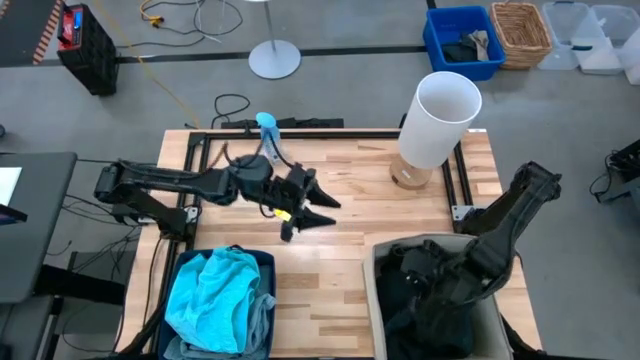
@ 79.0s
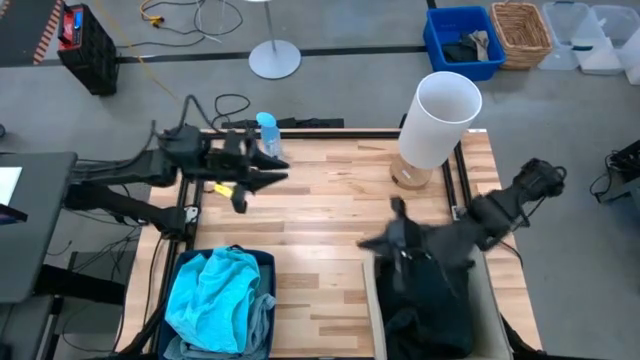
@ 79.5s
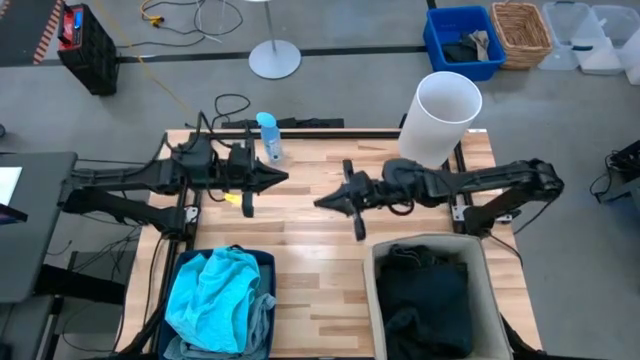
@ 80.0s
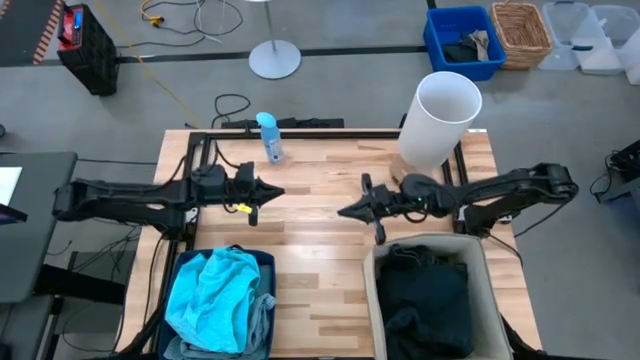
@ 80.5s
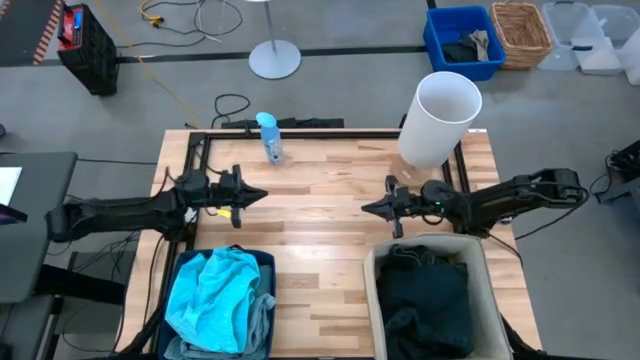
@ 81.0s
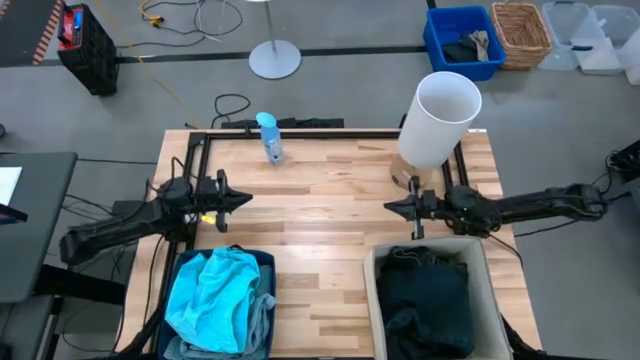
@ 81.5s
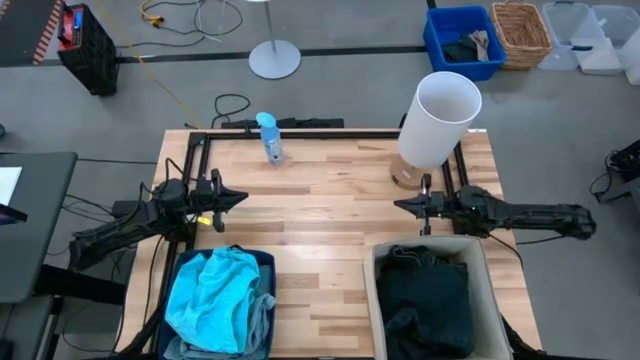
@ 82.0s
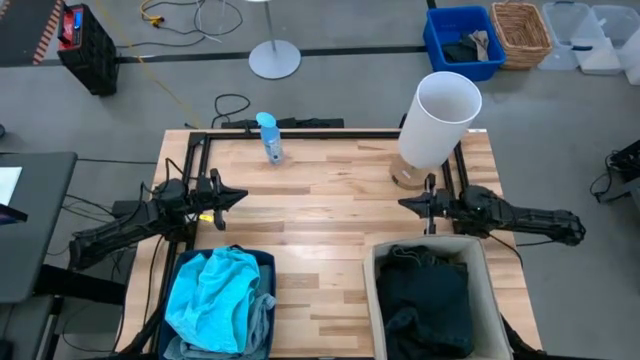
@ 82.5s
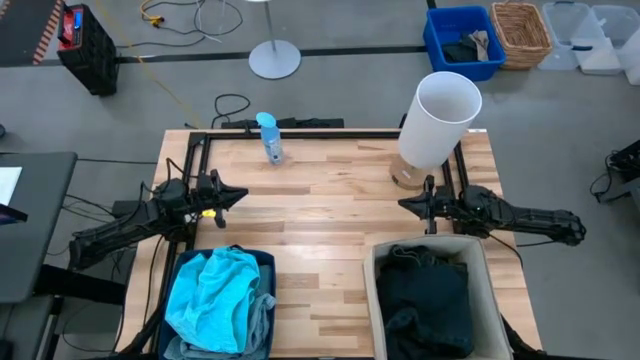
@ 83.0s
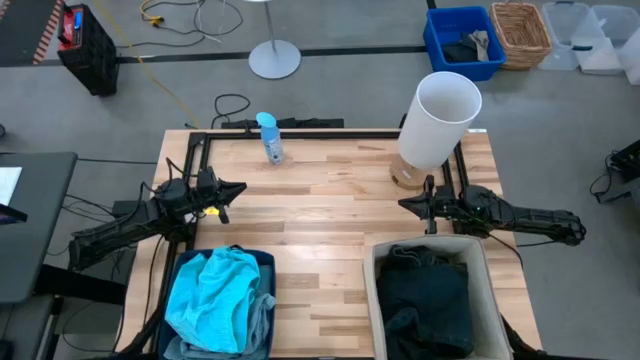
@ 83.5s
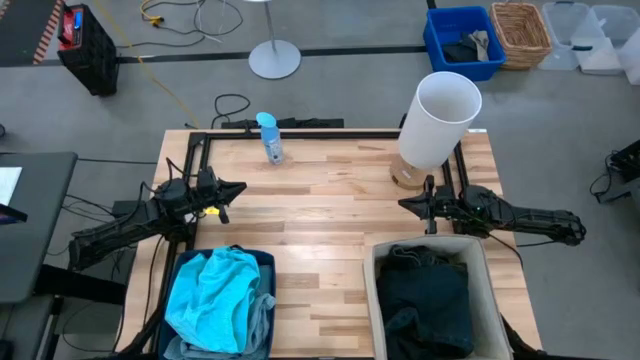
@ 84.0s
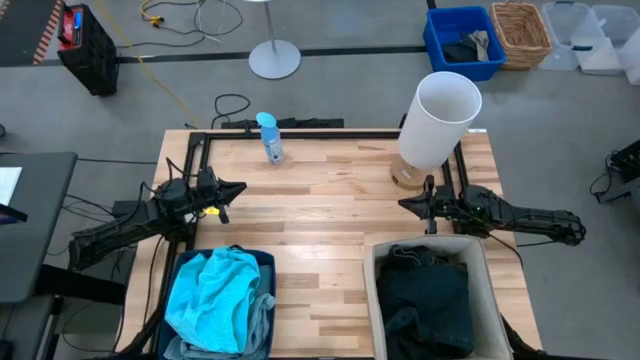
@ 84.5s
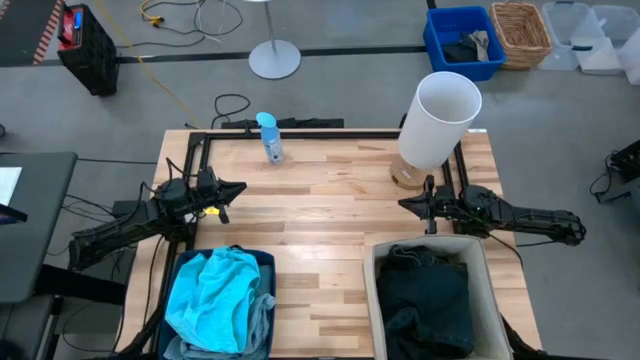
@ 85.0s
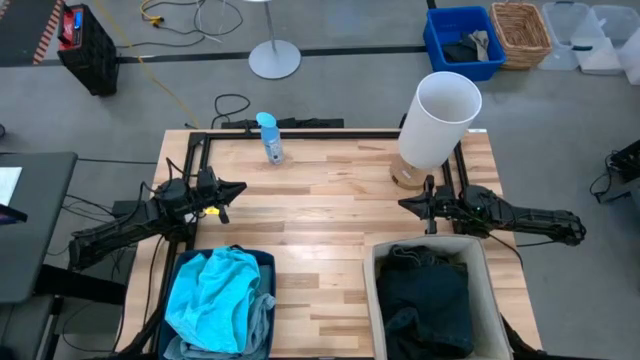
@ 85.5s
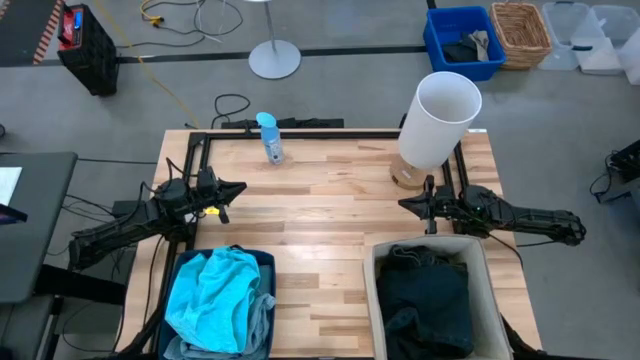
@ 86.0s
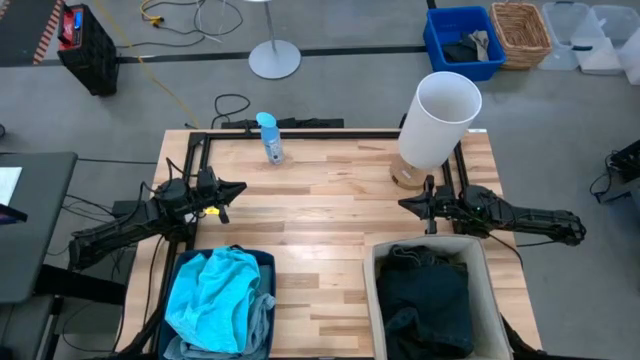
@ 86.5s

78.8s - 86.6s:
Task: Sort clothes
Return to Home Position

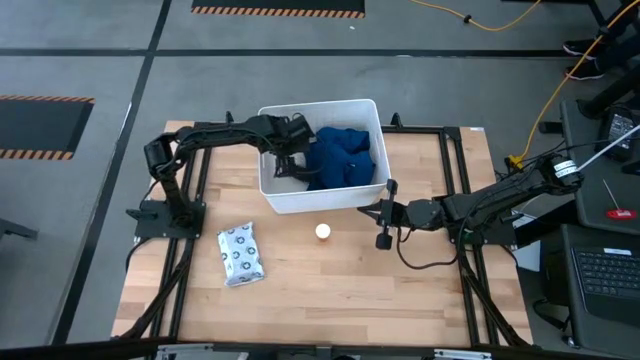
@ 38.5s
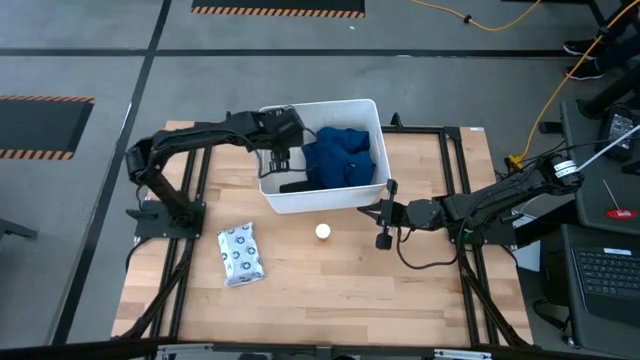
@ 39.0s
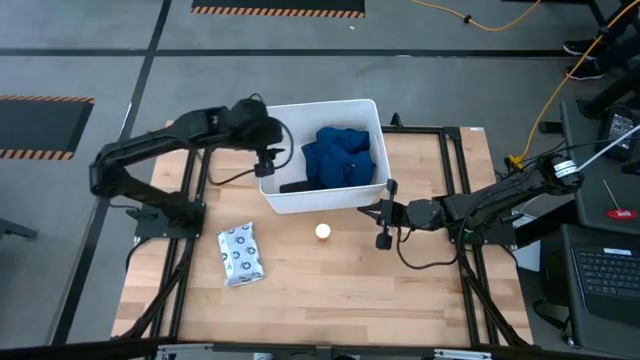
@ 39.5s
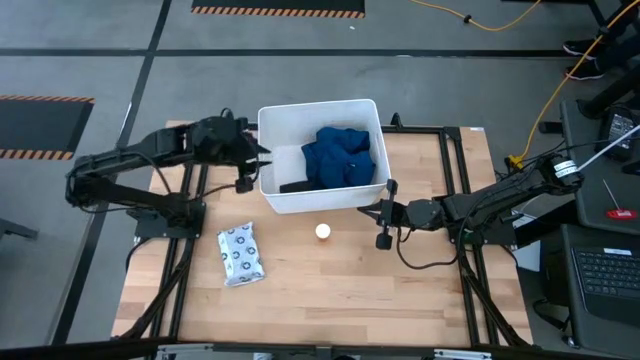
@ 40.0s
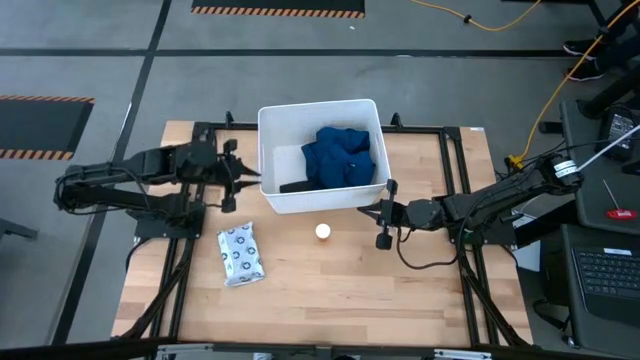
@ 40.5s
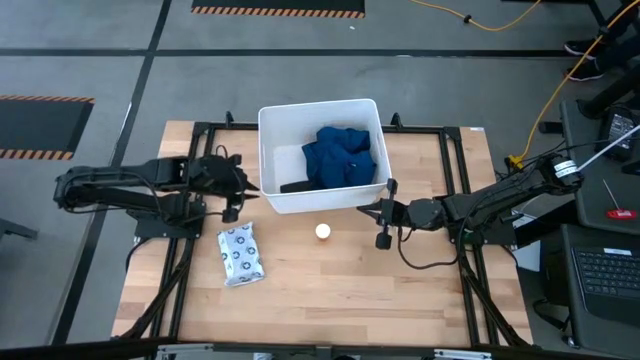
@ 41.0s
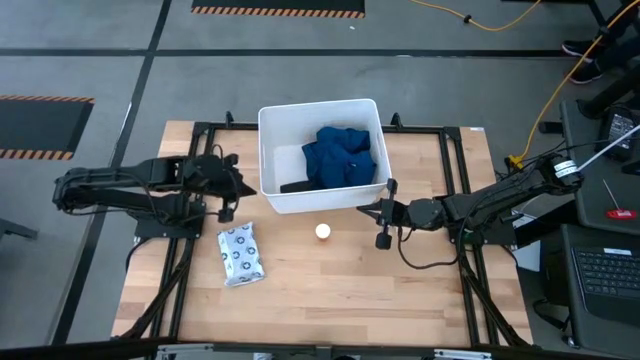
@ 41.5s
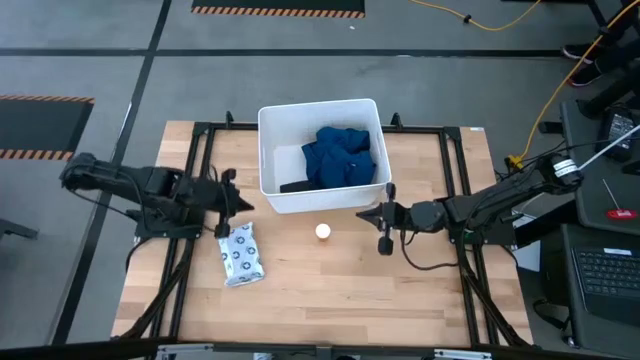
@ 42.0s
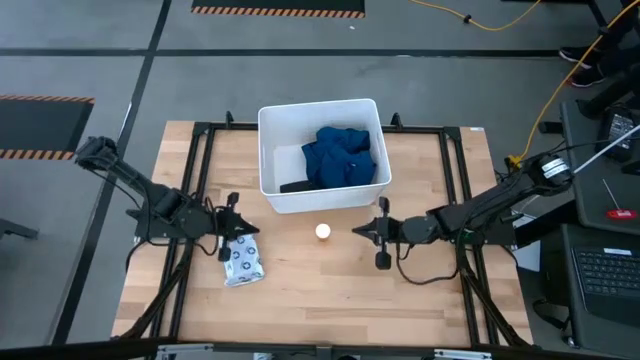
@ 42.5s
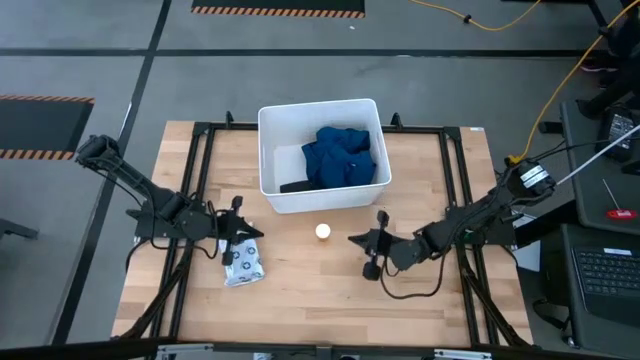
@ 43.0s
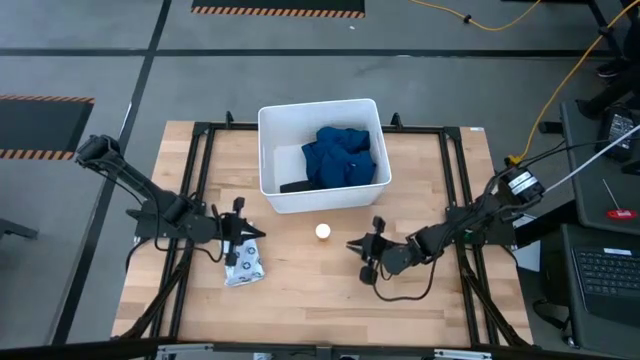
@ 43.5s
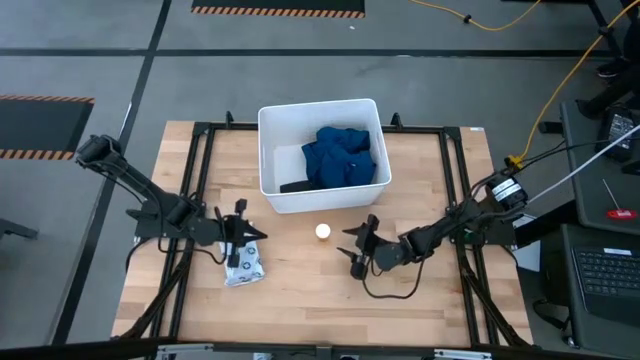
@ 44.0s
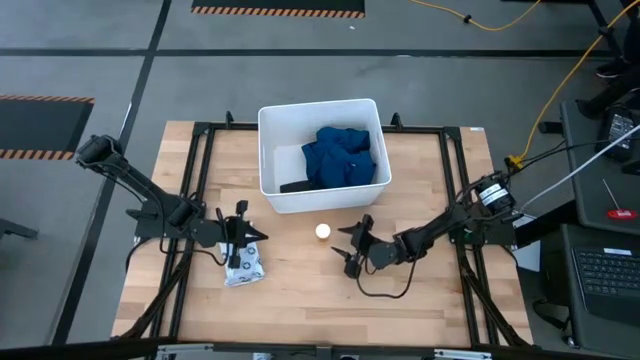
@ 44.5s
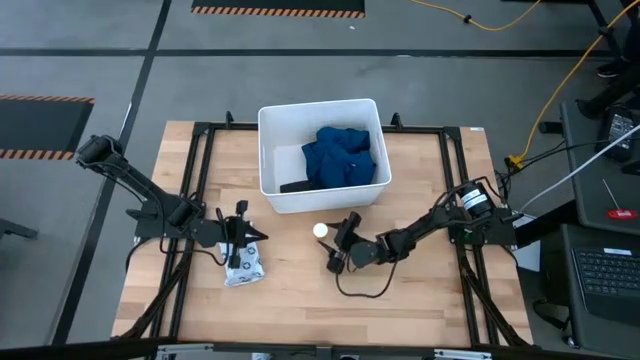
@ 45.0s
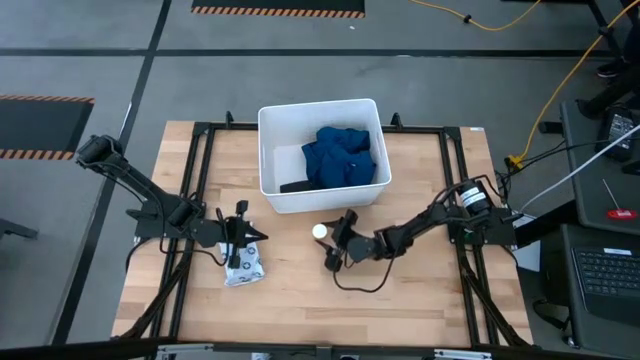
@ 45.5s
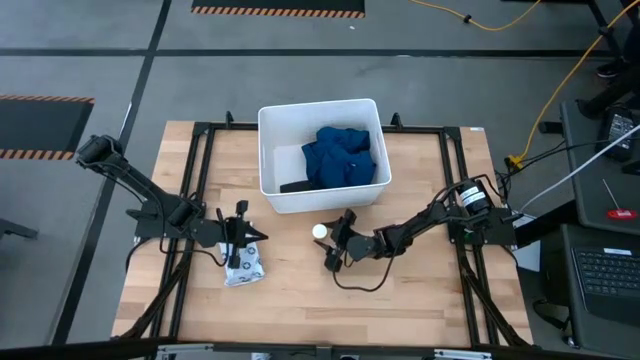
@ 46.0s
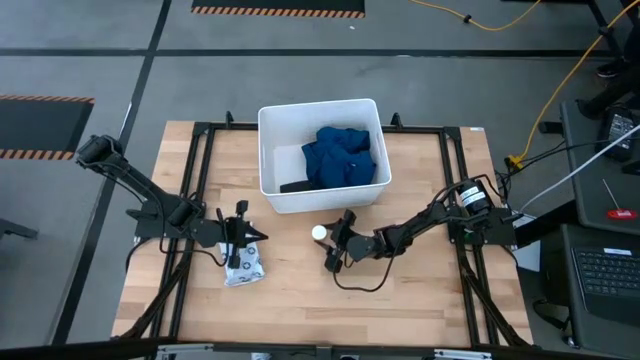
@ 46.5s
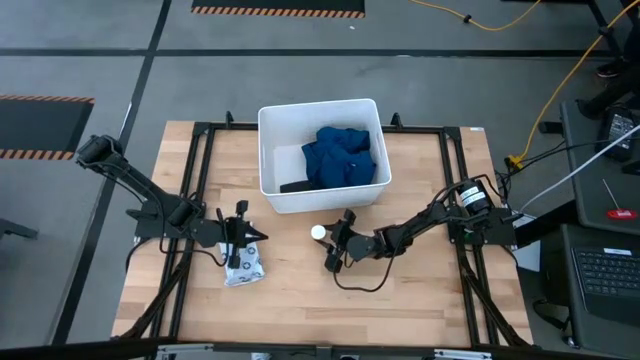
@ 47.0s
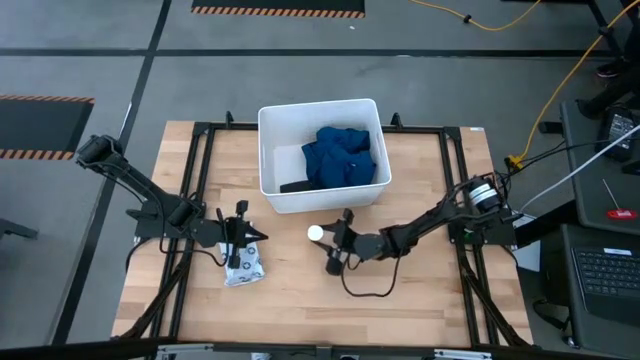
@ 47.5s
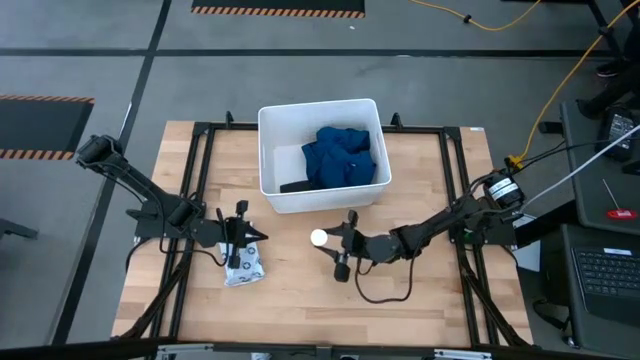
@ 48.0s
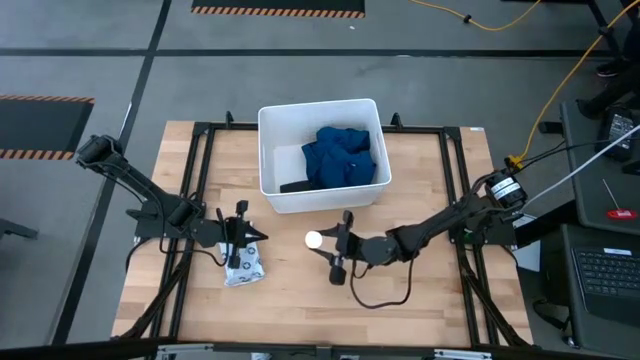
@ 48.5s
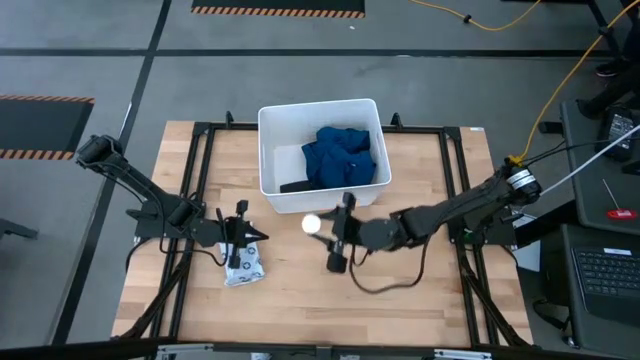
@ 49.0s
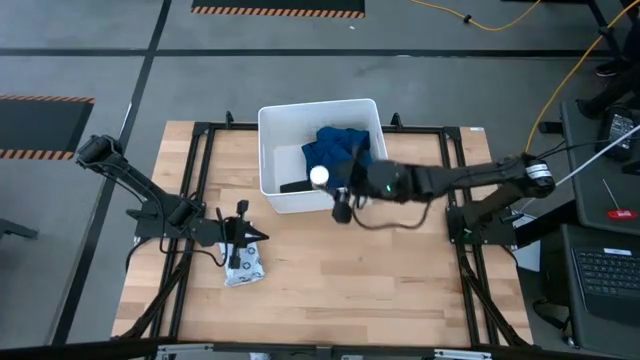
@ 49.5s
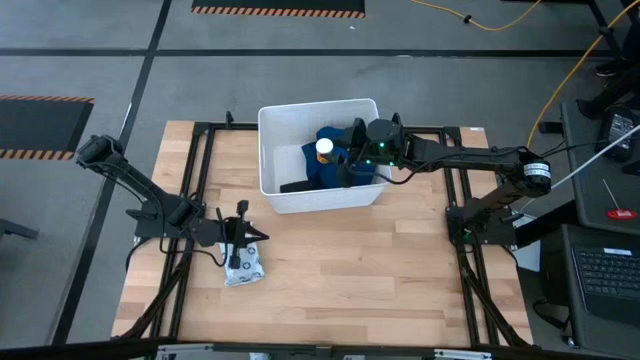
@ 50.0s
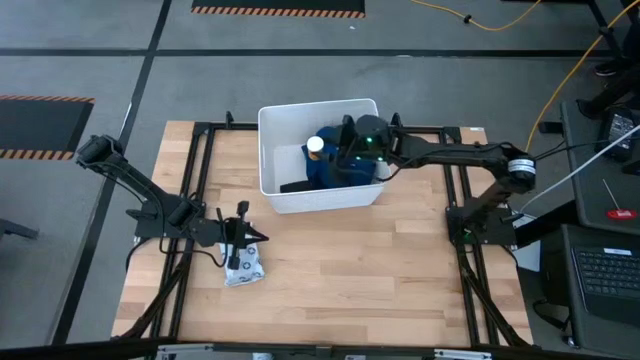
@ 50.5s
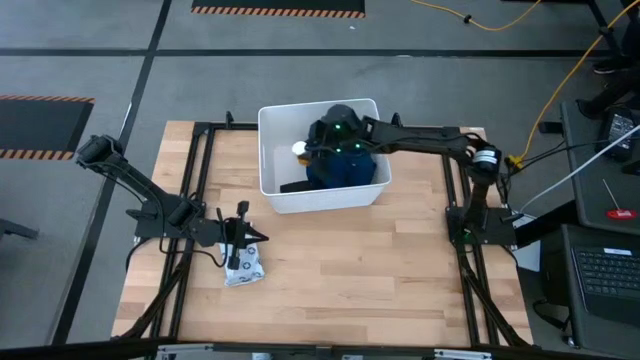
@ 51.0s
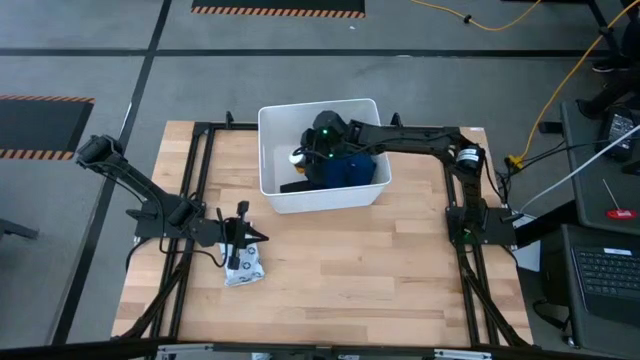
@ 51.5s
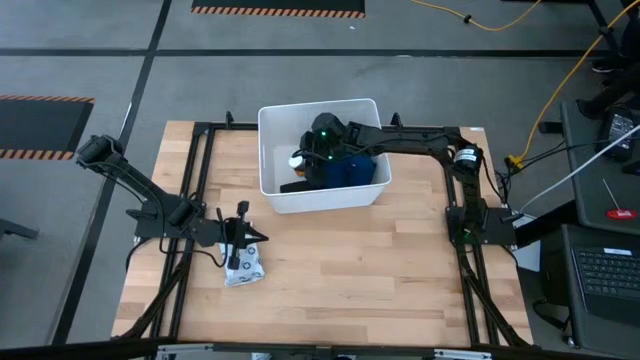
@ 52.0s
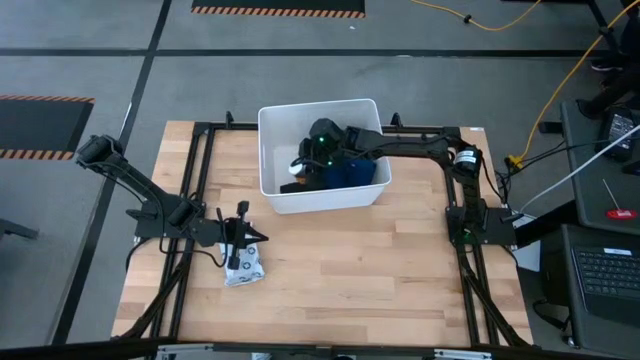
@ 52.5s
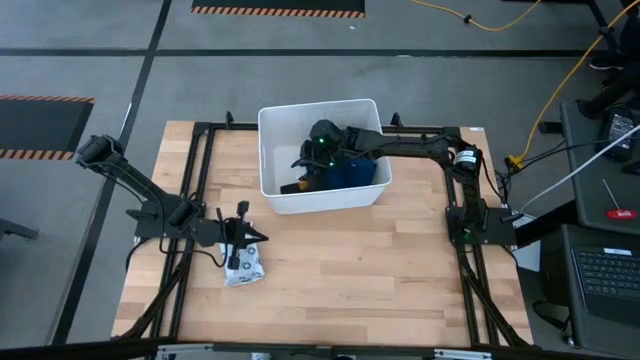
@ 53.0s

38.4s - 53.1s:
Task: Pick & place medical supplies in basket/bin
Put the orange pill bottle into the white bin
